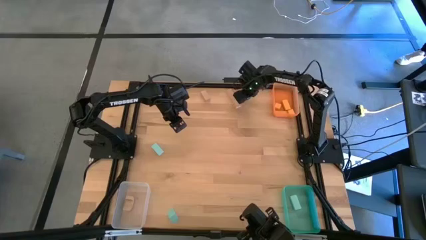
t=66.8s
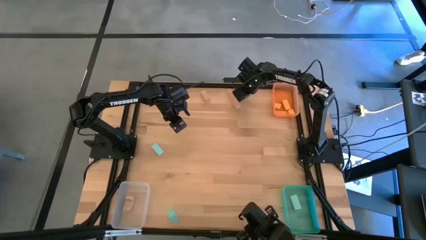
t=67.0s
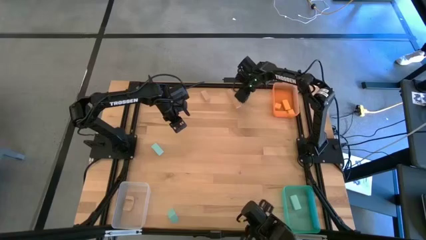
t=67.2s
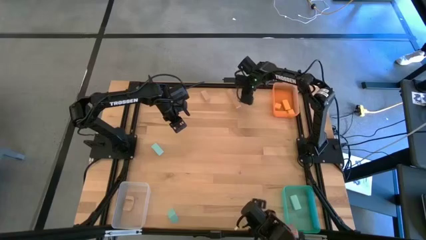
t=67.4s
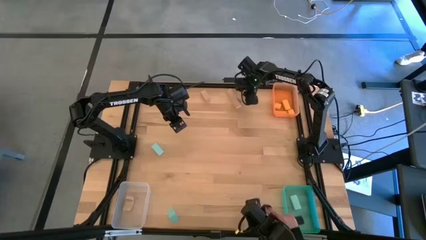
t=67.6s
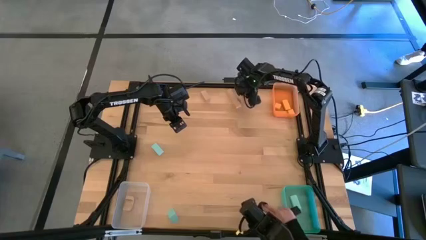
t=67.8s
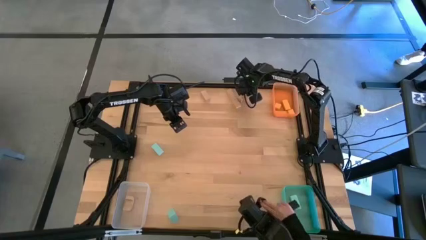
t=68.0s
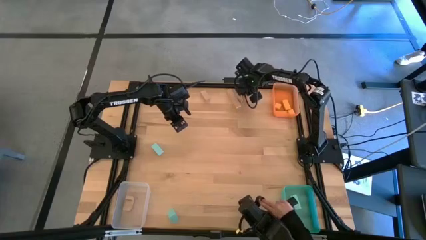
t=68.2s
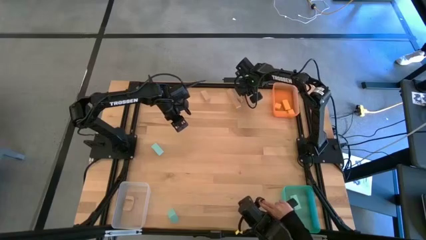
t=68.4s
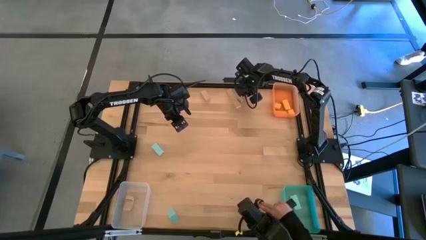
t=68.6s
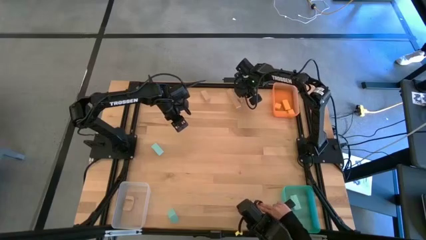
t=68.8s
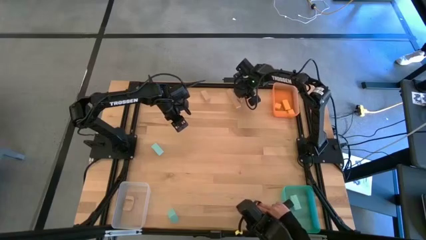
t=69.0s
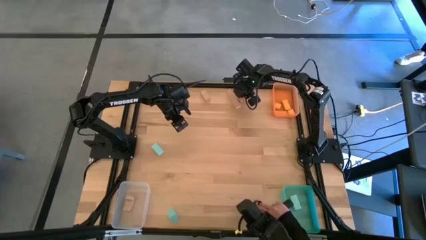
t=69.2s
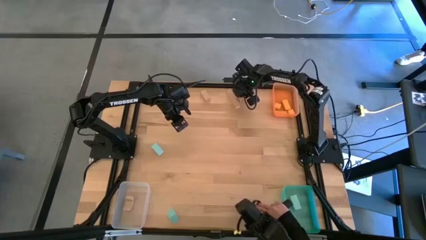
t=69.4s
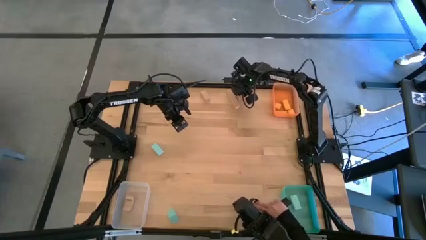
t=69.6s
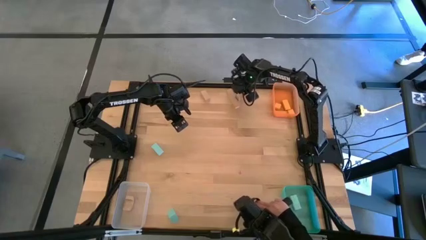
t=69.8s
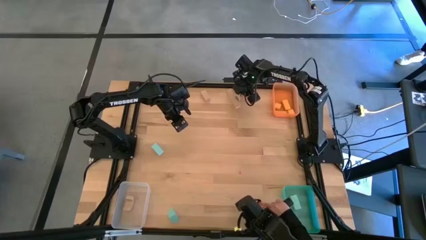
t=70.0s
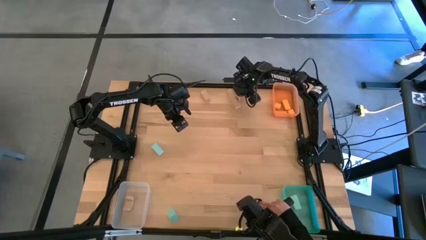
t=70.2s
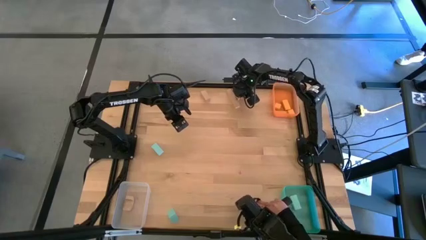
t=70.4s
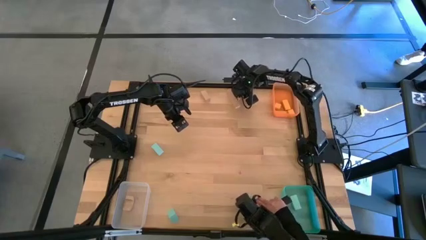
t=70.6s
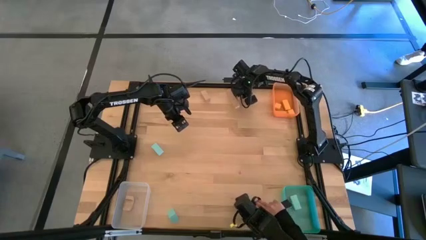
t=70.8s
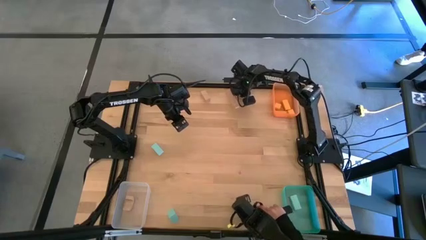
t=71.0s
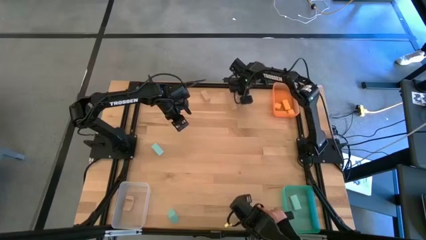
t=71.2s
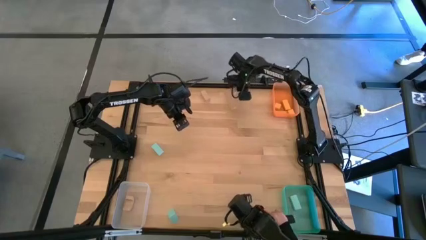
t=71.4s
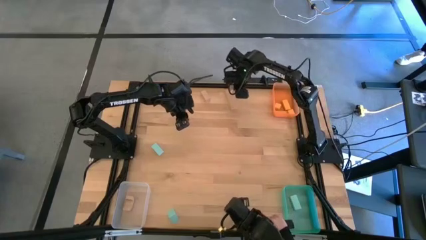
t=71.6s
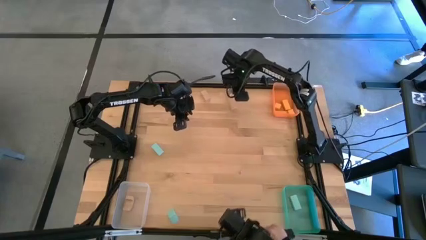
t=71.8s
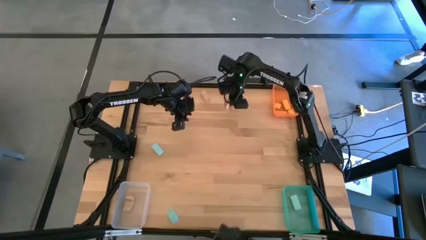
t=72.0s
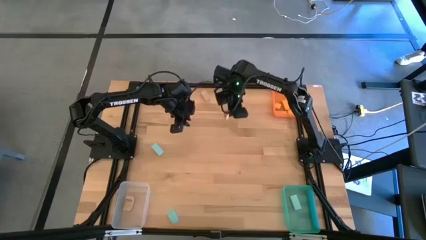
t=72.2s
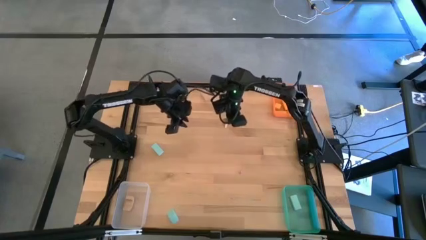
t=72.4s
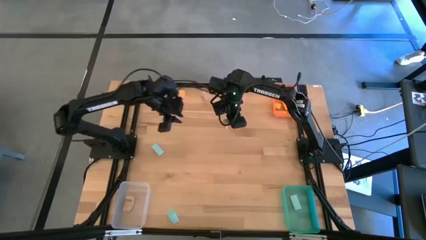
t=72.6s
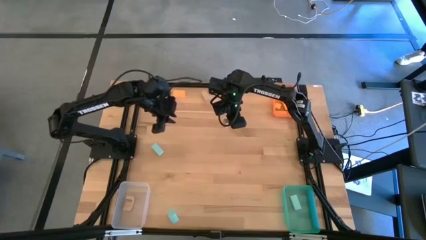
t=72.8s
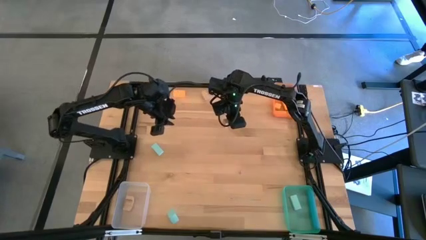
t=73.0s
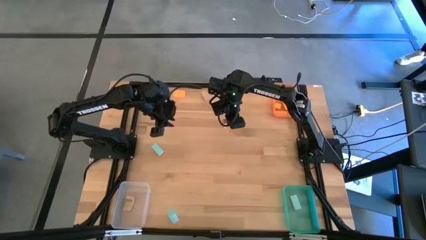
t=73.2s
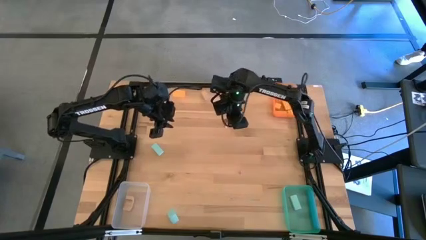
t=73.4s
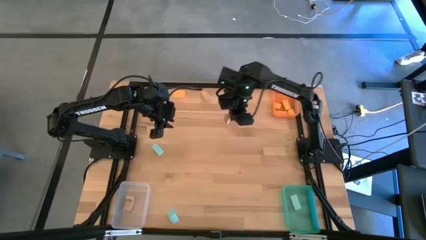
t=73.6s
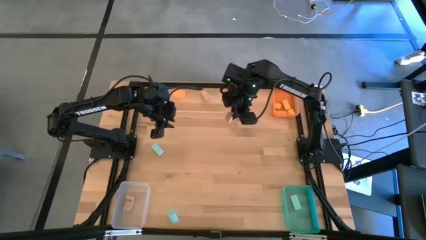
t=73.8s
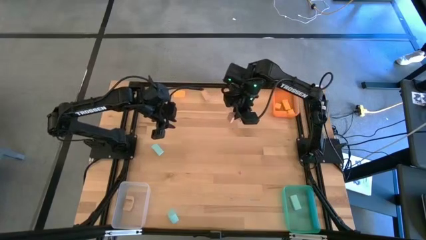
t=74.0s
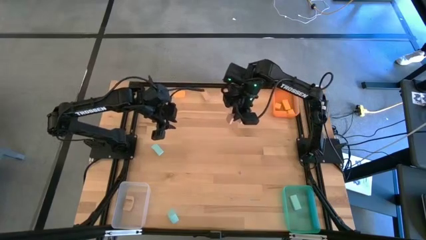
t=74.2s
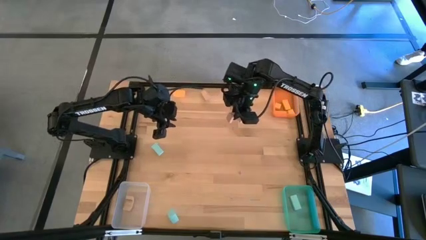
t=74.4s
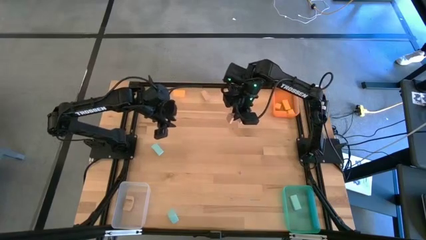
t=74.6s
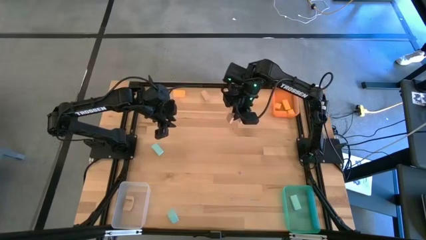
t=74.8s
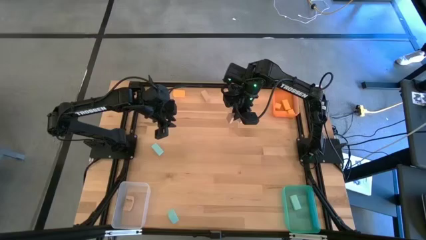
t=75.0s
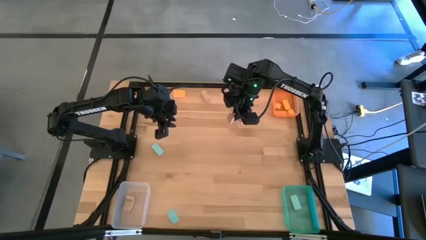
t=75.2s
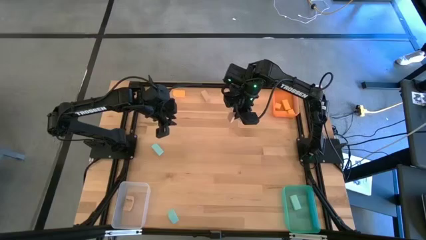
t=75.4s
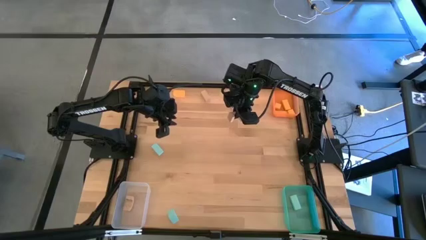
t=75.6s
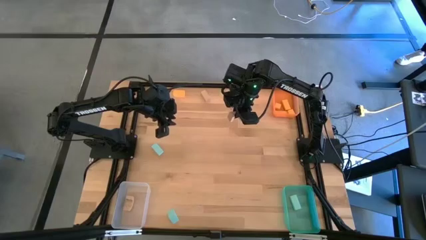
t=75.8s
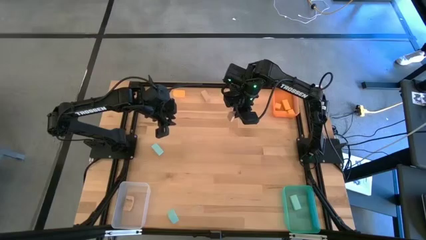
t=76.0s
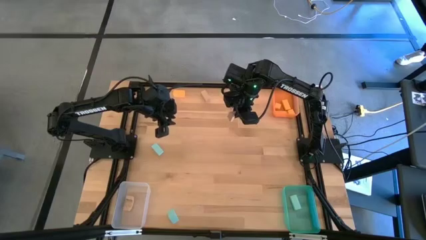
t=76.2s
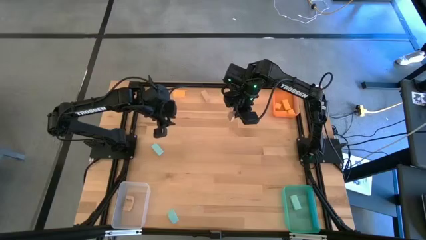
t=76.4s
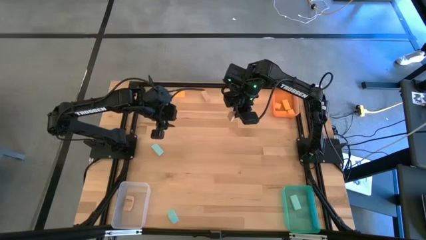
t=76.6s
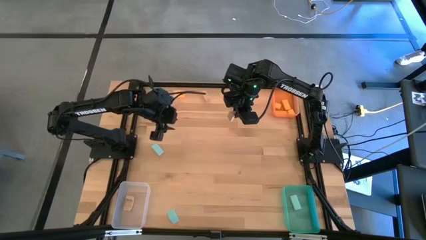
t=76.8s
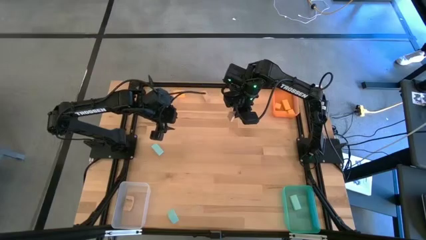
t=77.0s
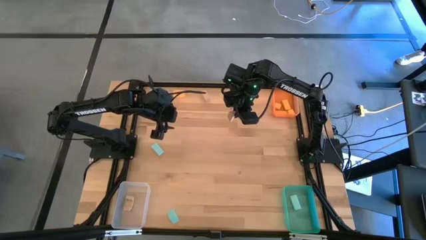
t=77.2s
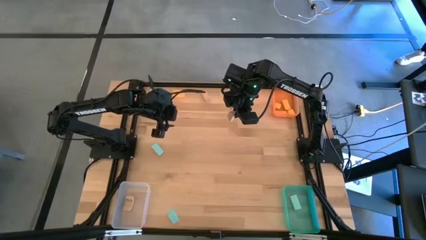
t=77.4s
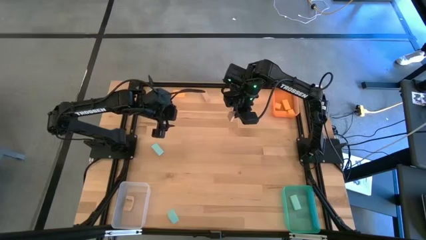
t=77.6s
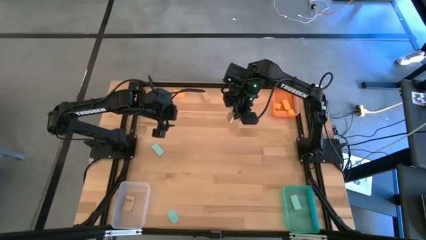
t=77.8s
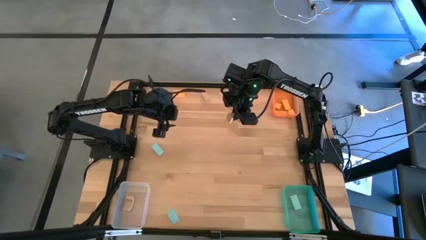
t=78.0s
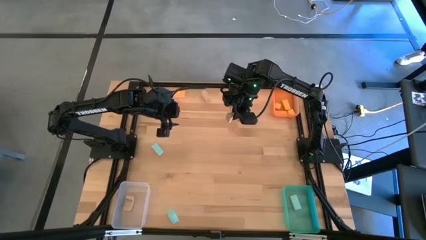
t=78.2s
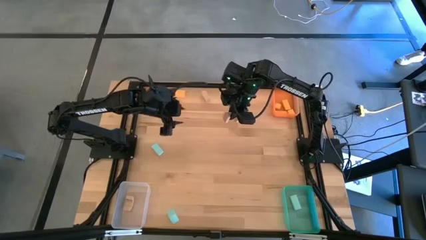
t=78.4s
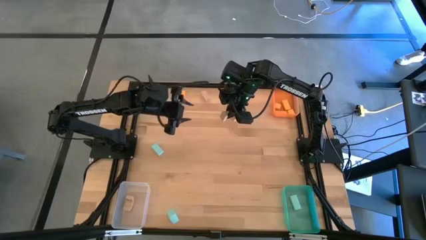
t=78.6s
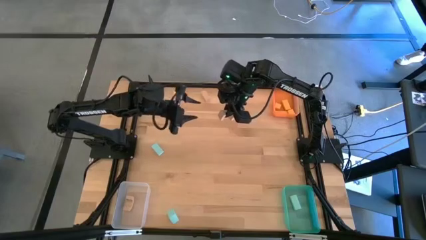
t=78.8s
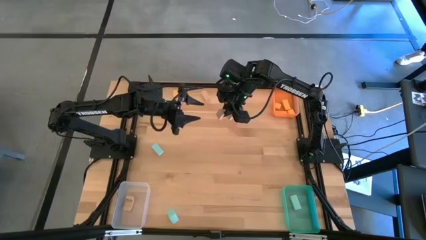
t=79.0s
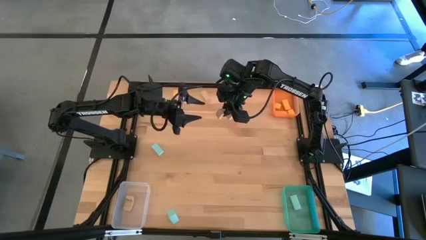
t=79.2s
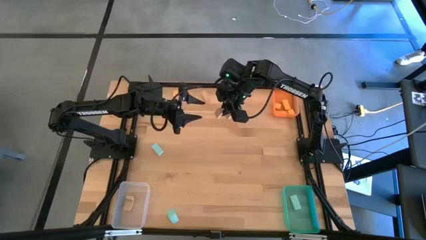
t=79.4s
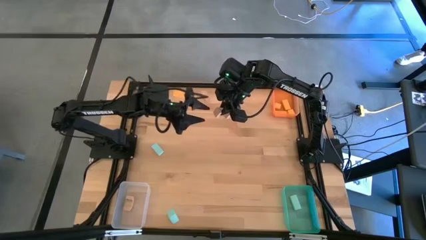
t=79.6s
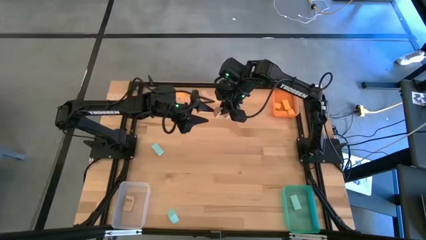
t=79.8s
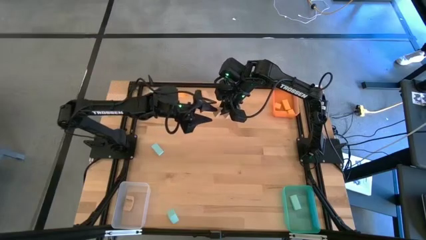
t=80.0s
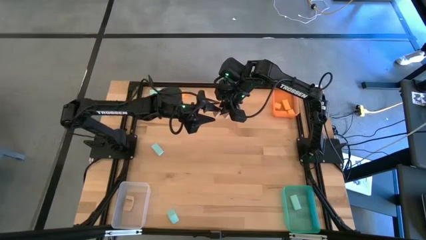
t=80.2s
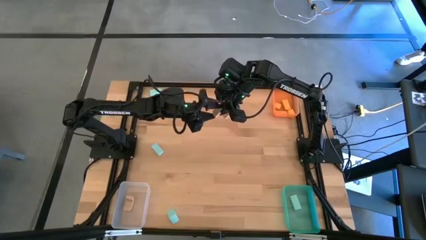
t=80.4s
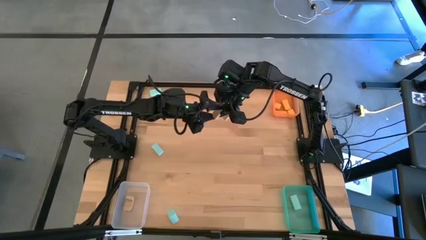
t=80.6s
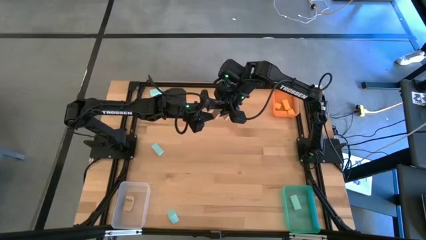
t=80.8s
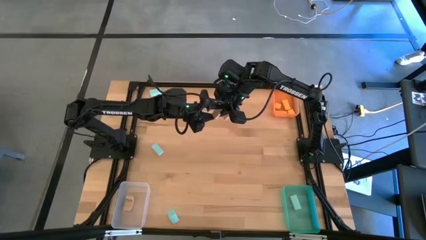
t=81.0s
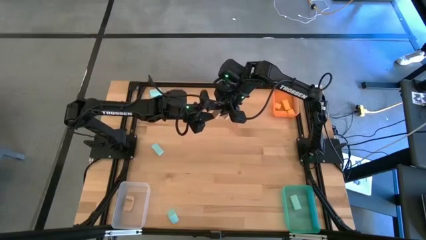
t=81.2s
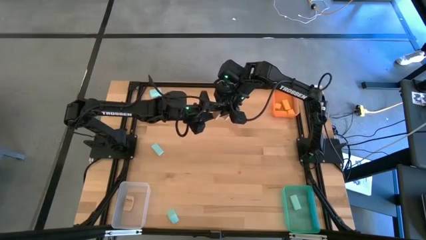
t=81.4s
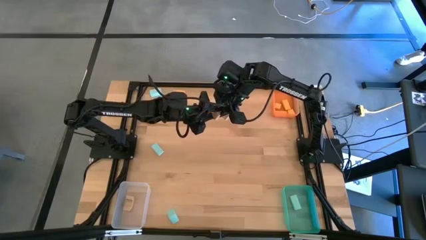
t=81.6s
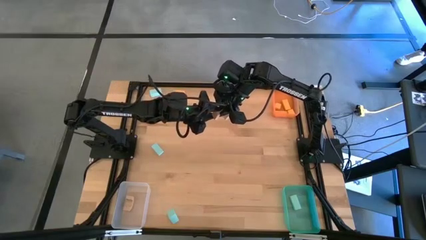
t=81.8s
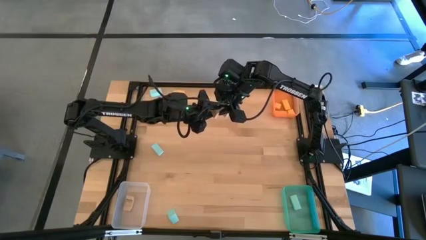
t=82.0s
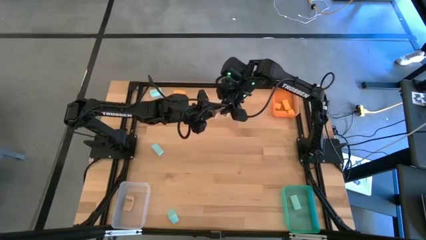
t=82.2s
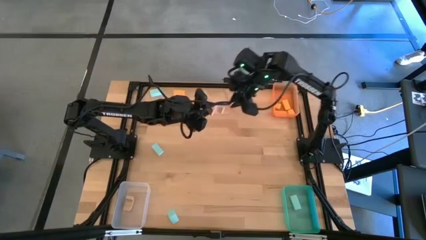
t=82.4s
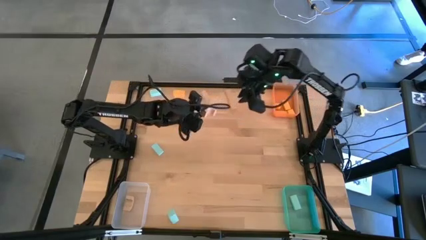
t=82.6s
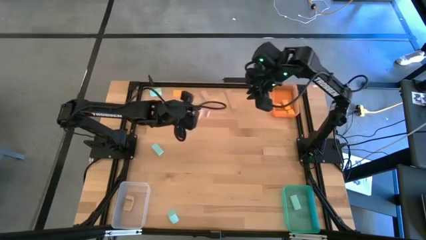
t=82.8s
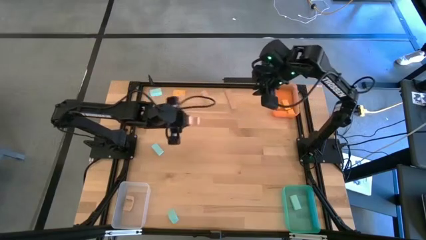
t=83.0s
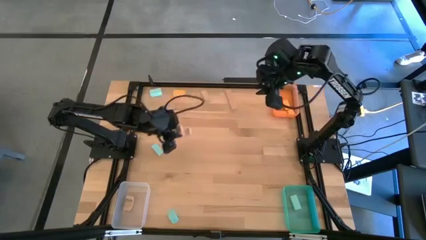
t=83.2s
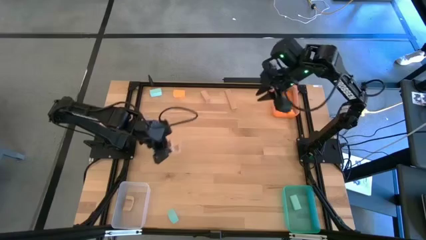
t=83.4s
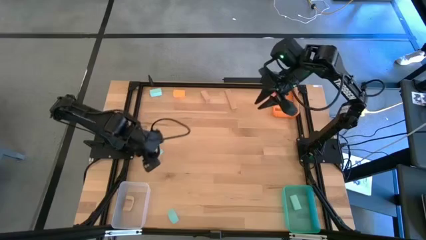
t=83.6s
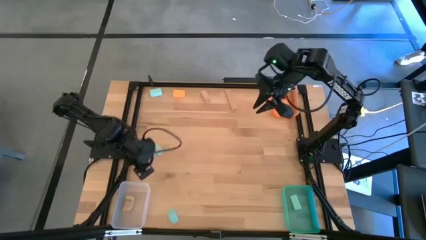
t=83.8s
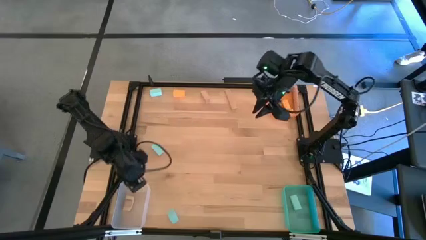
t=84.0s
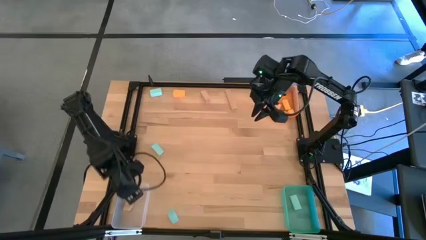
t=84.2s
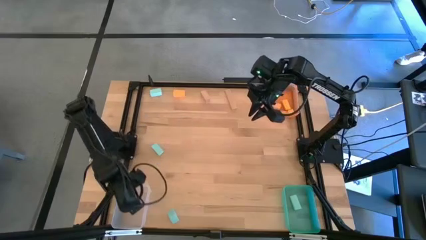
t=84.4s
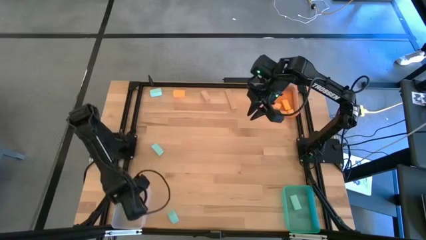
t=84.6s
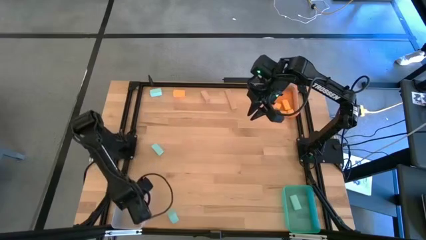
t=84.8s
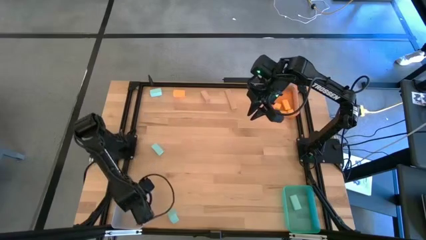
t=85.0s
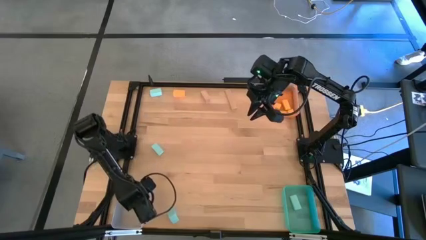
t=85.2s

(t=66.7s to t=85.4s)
Task: Sort & place blocks by color
Put the brown block into the transparent bin
